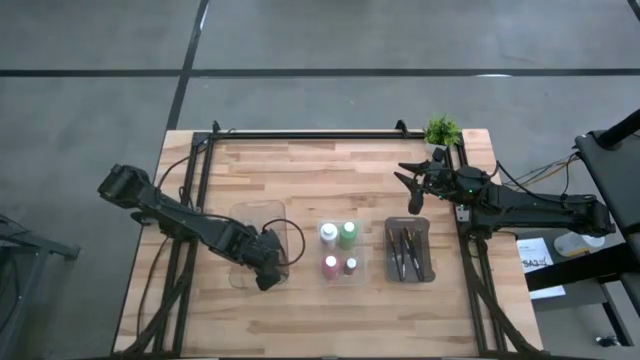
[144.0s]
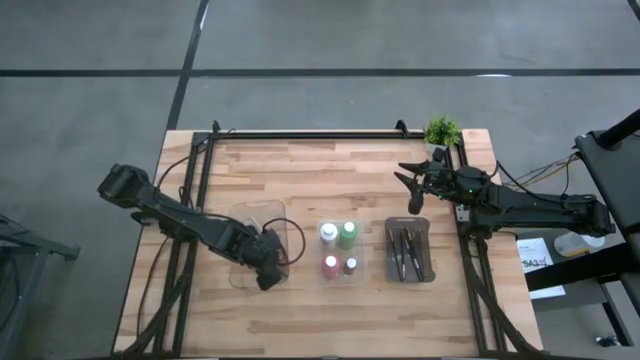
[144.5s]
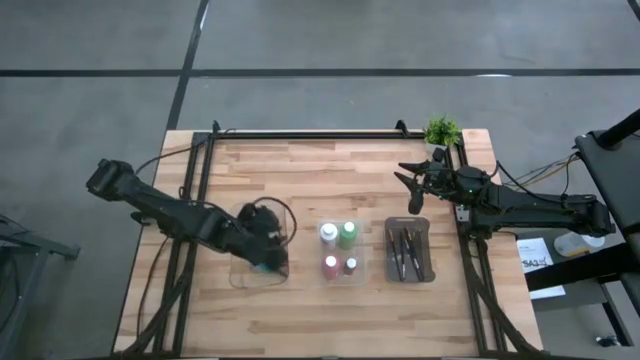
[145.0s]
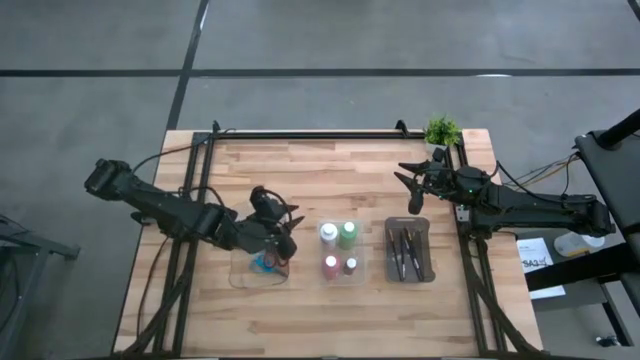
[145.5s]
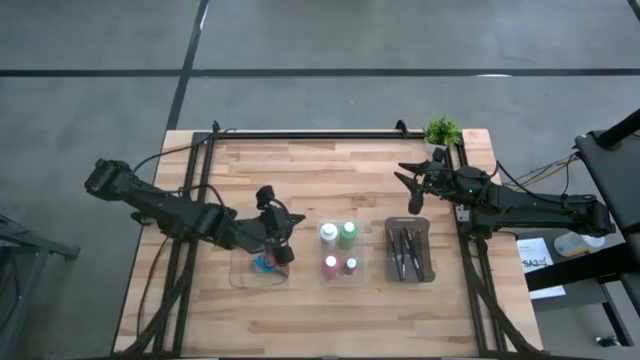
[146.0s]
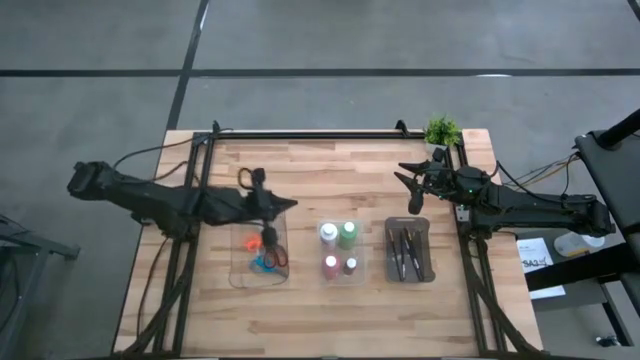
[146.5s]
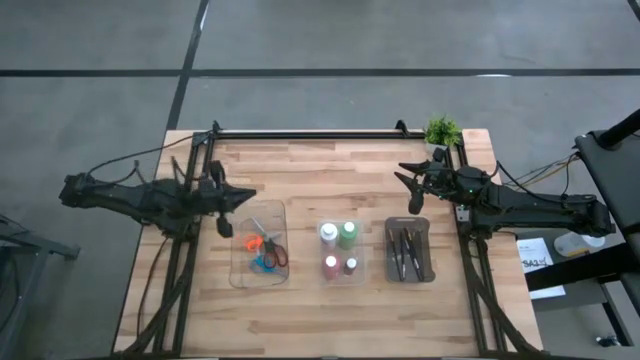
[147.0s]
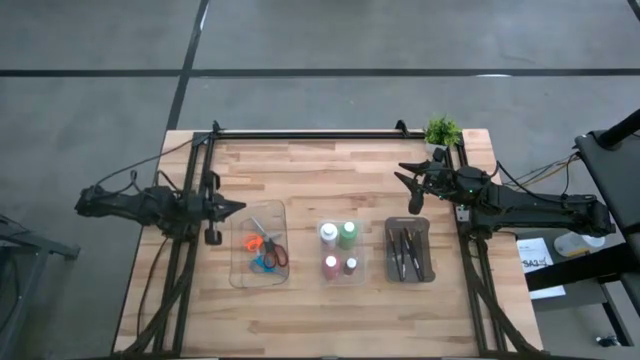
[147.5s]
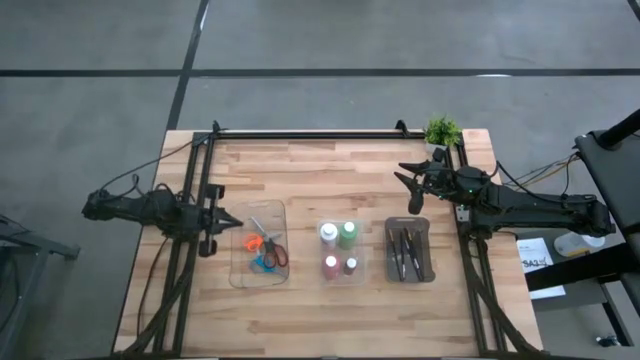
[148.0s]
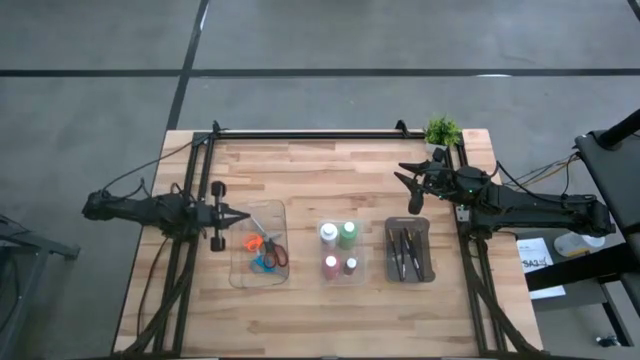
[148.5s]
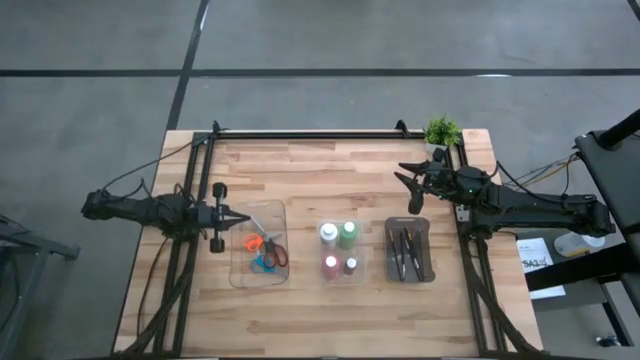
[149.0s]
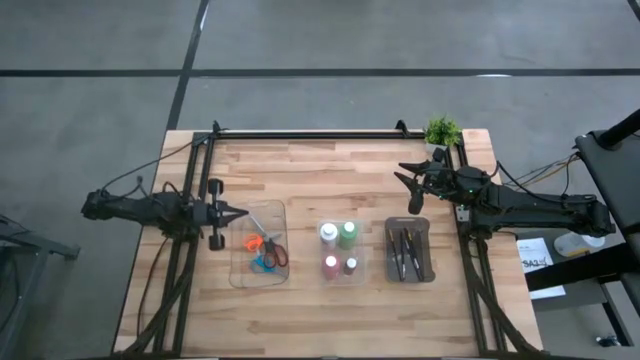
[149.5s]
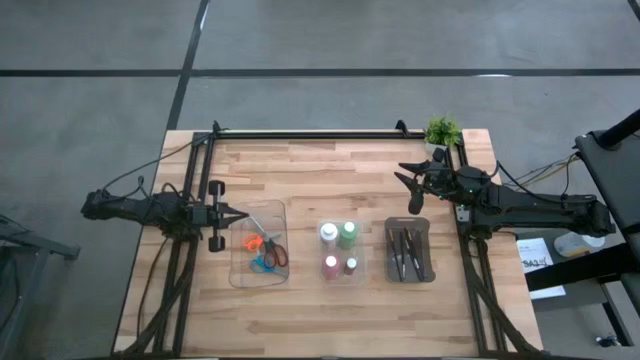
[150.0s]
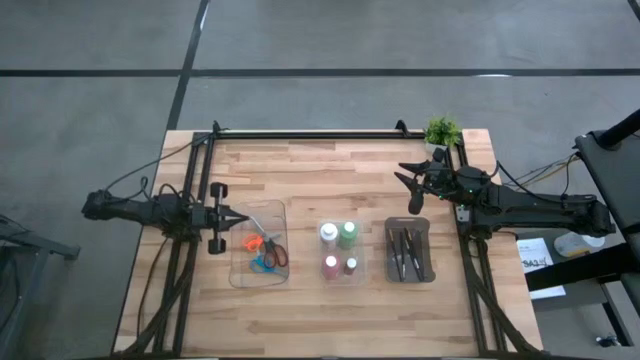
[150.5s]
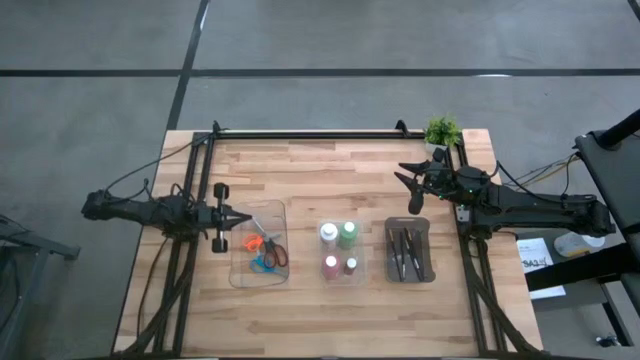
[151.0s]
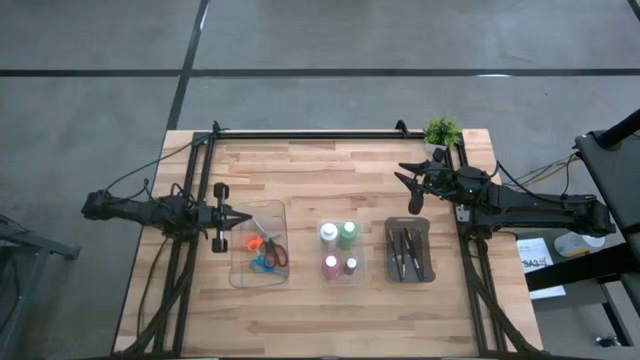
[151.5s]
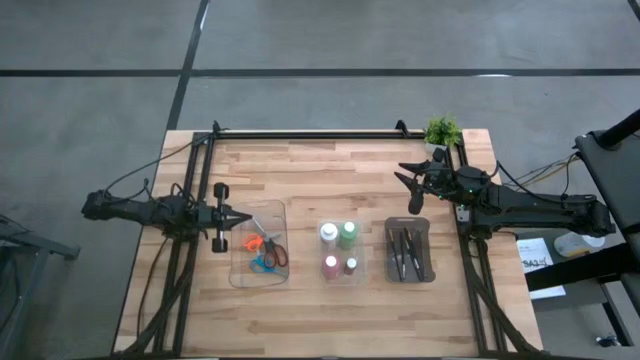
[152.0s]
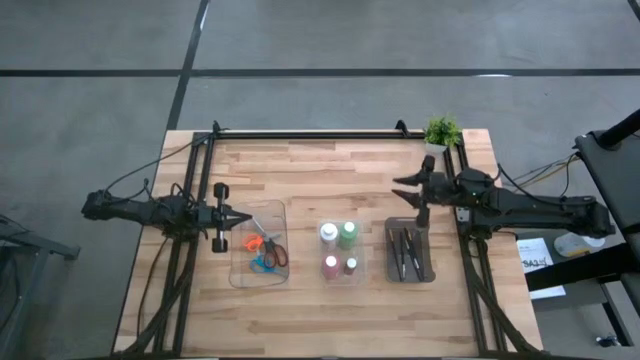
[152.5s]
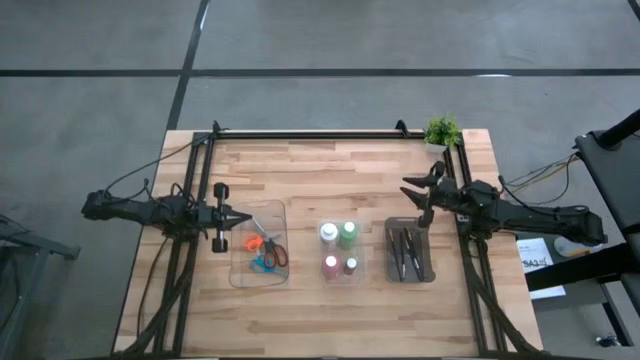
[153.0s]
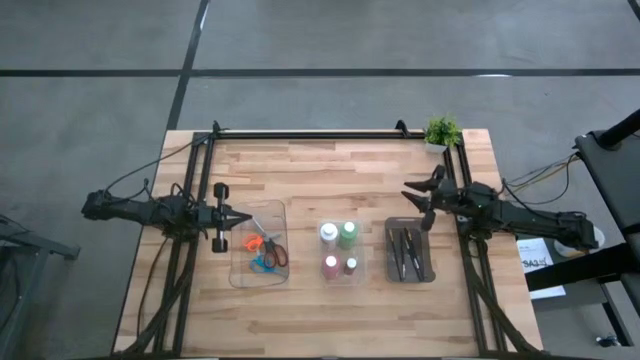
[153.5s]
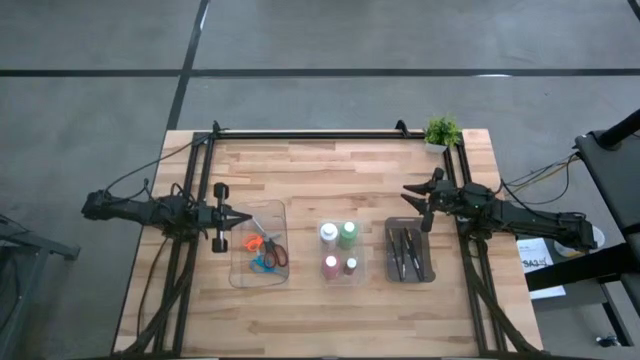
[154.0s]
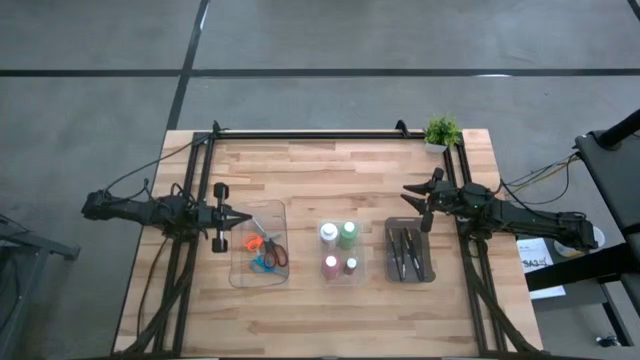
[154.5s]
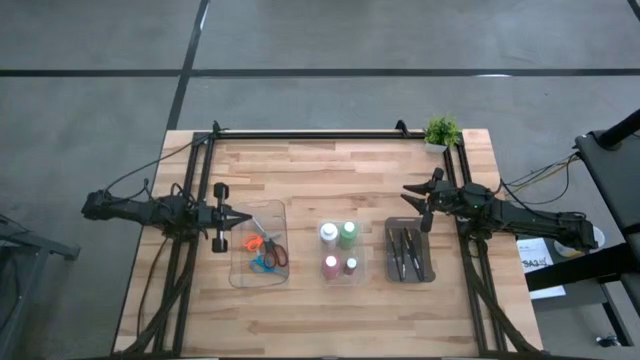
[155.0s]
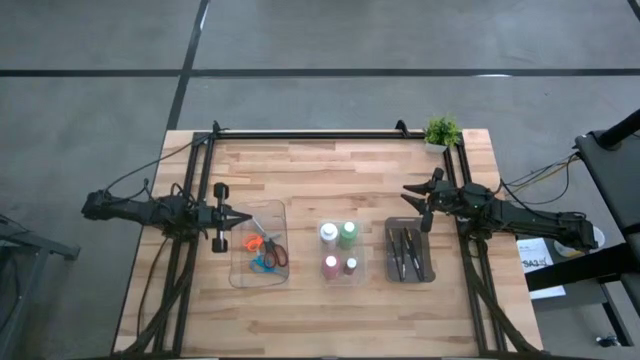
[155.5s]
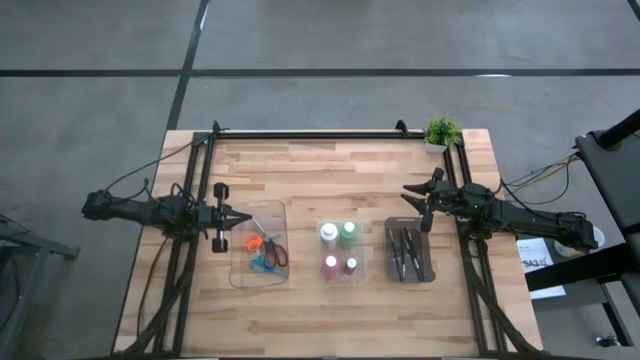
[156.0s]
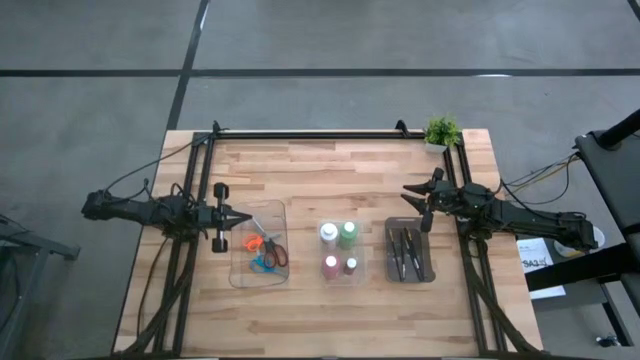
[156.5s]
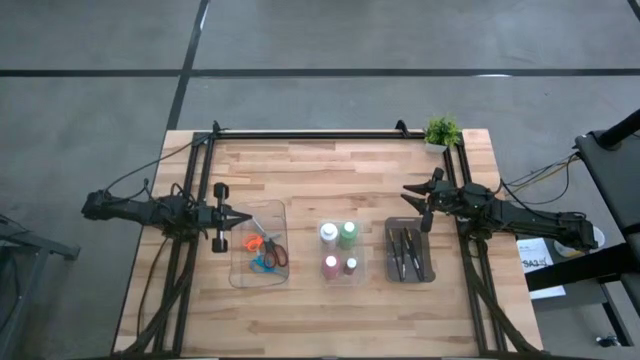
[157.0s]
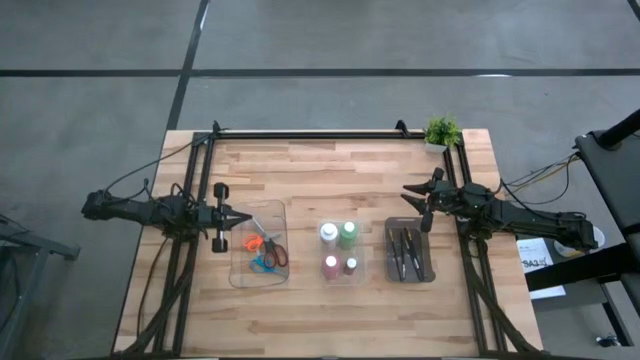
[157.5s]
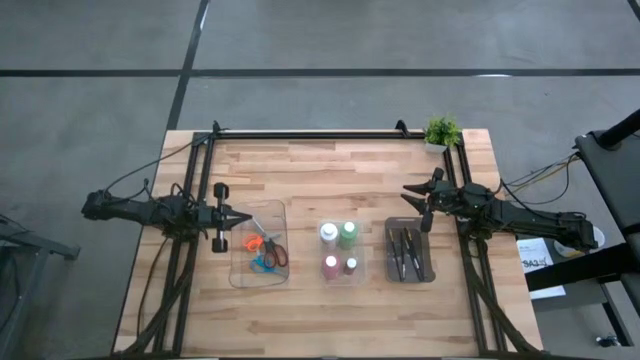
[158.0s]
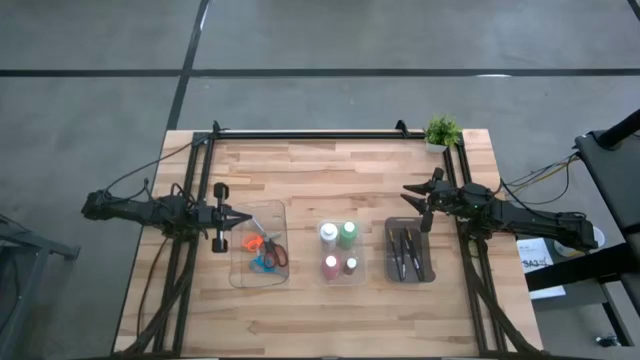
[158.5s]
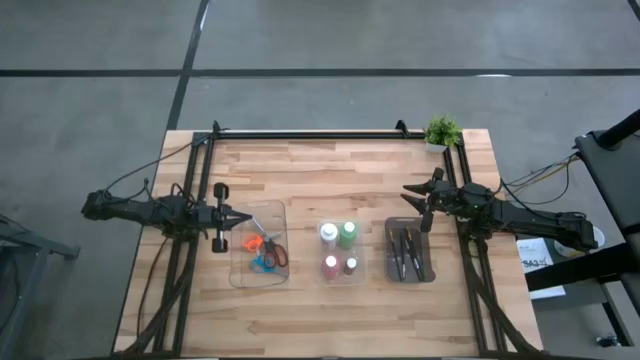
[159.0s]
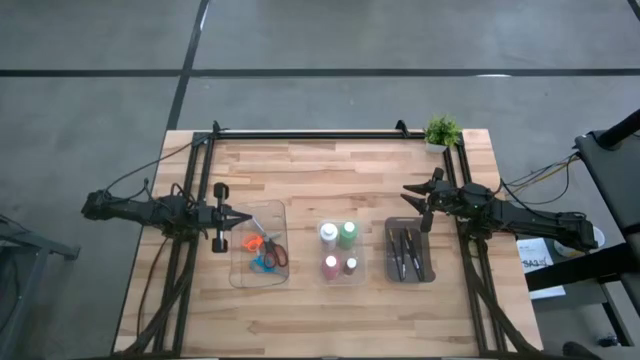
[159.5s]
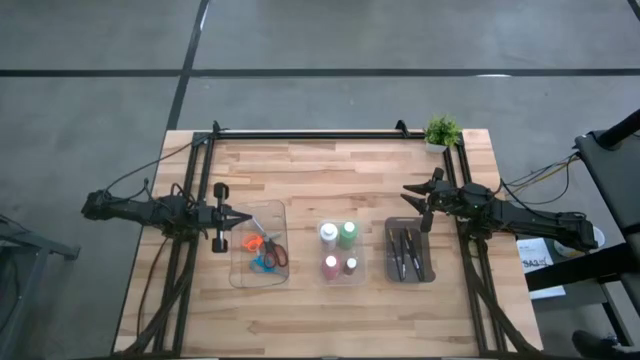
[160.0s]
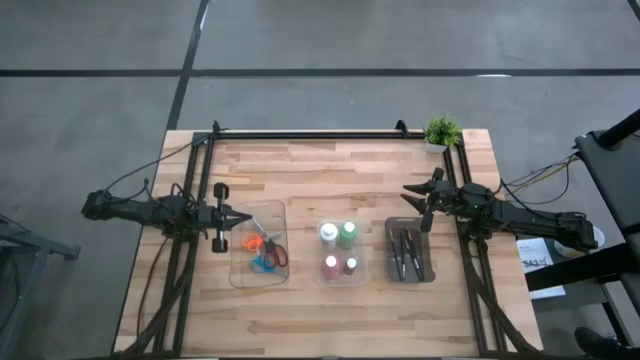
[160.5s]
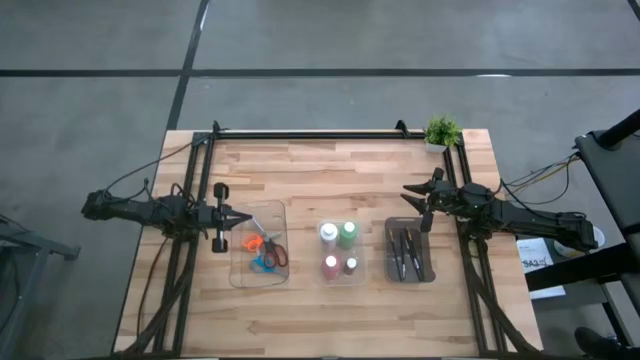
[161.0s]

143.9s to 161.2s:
Task: Pick & Place Paint Supplies
Return to Home Position

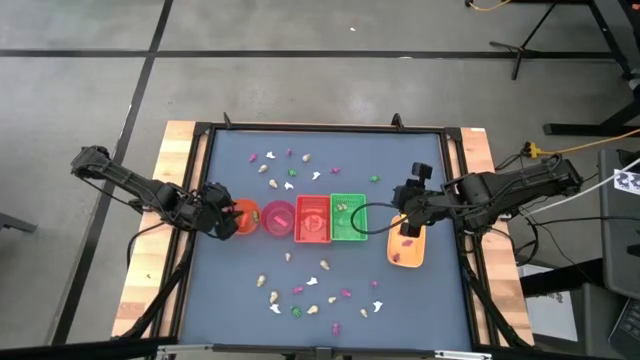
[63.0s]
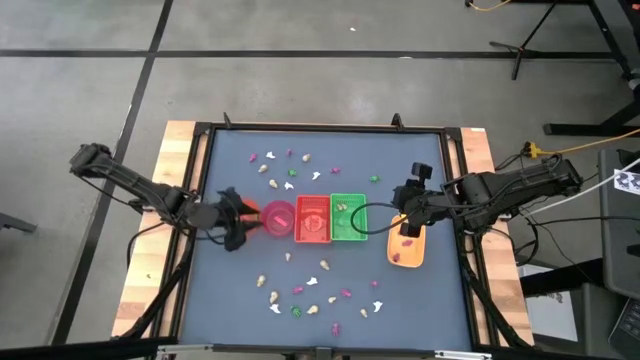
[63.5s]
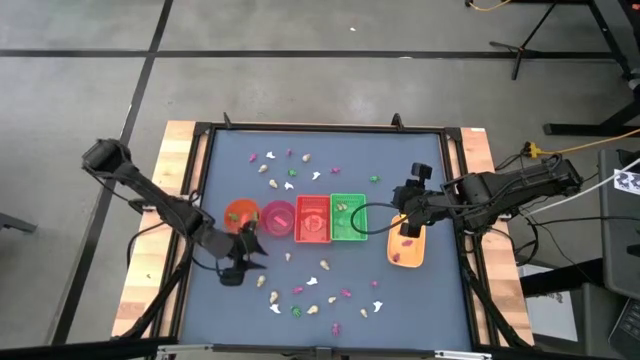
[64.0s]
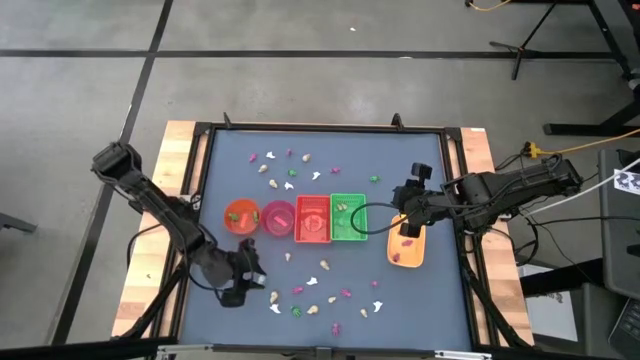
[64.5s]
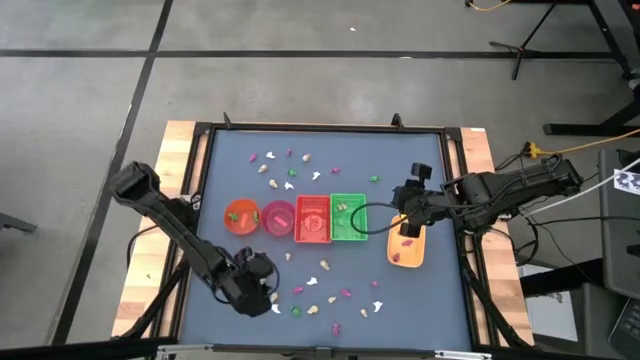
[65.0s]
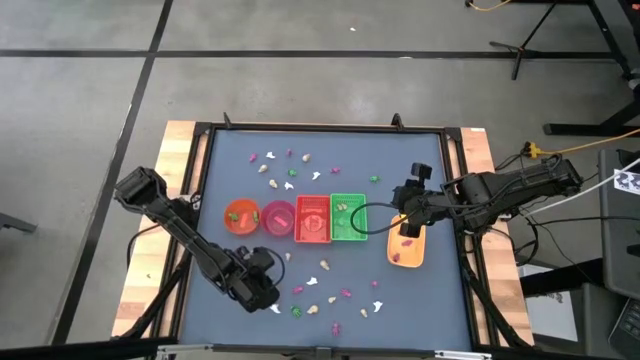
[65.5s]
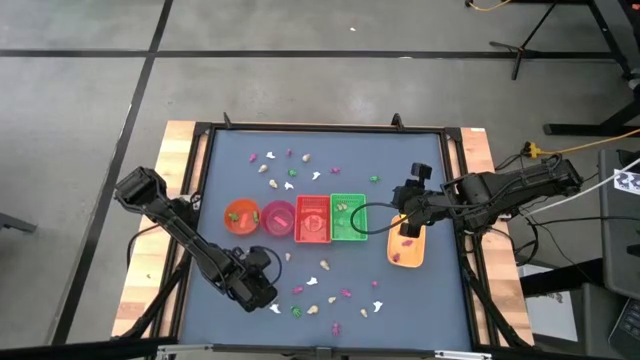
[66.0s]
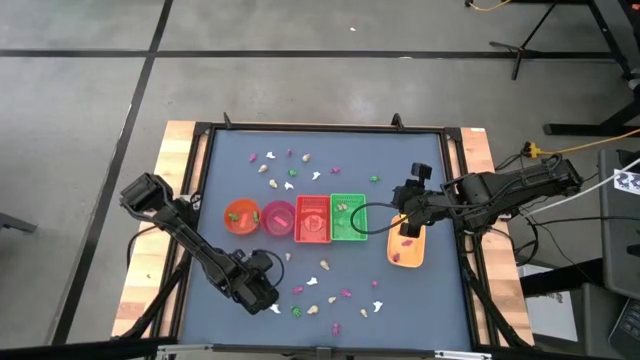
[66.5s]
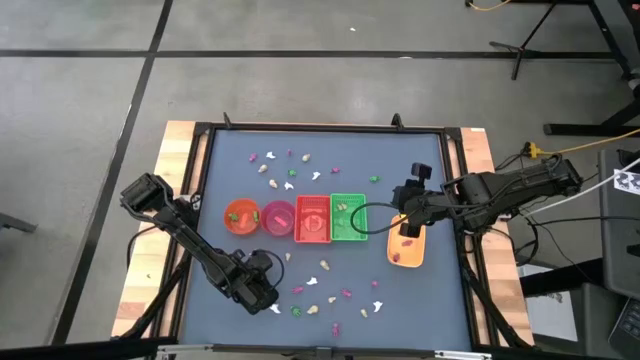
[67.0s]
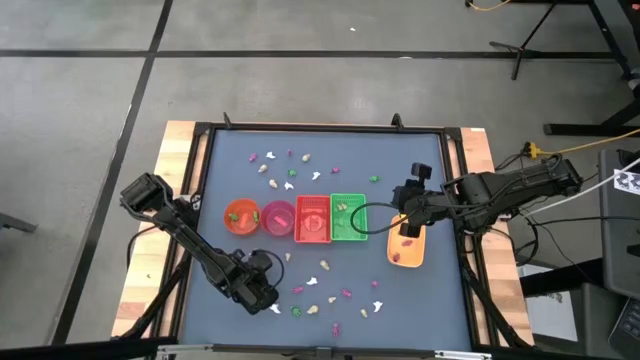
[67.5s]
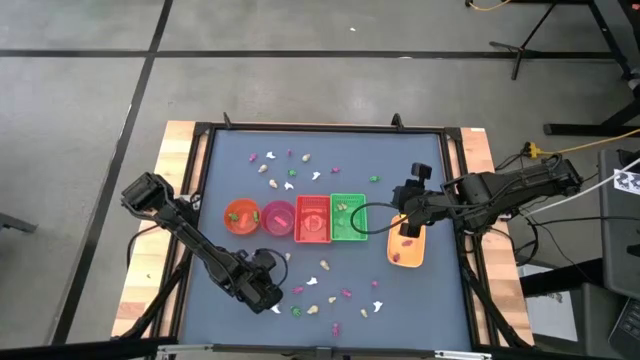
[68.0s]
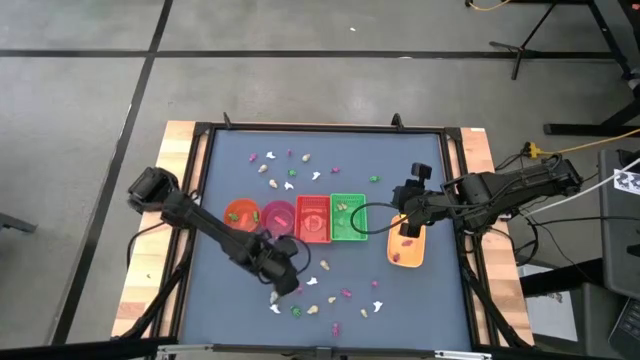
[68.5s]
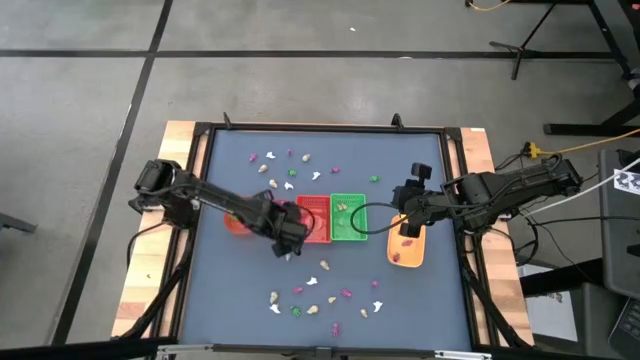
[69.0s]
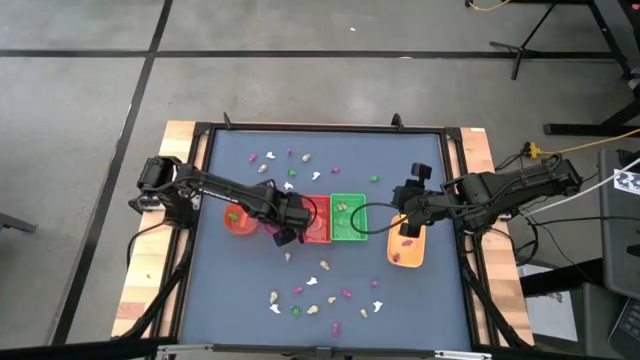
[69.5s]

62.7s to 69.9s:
Task: Sort Halloween decoration
Put the yellow skull toy into the pink bowl
